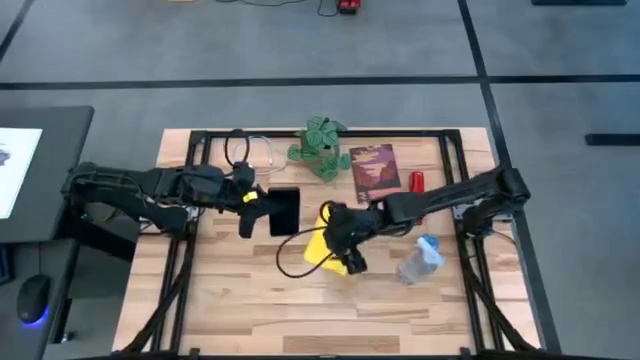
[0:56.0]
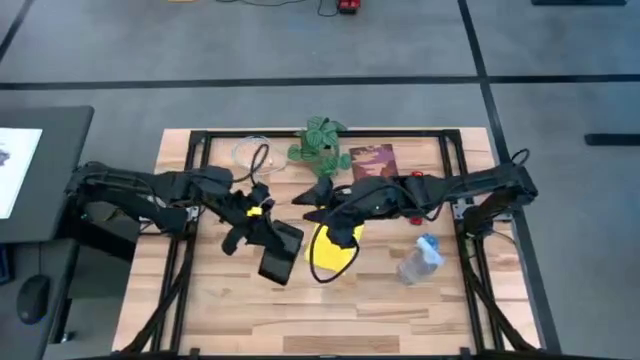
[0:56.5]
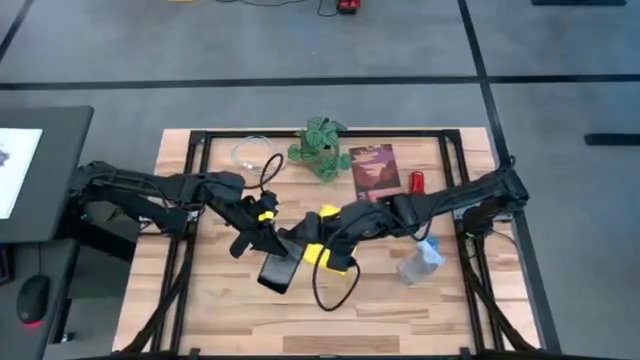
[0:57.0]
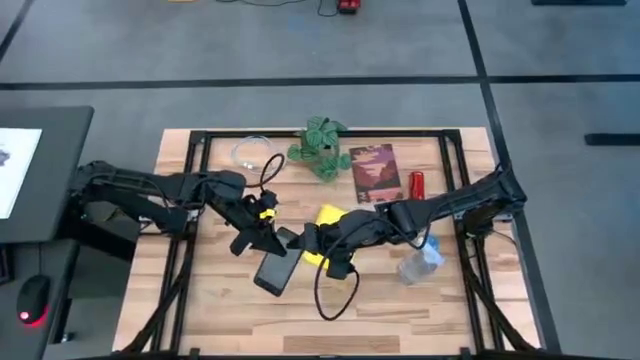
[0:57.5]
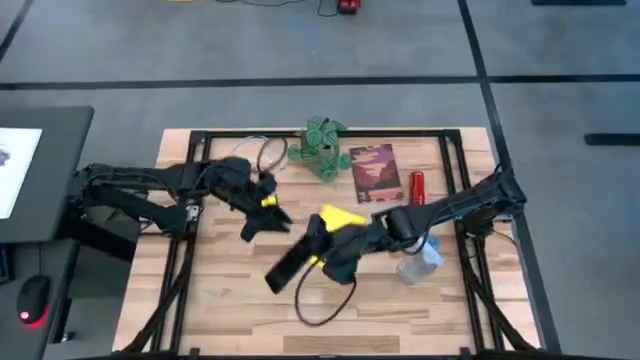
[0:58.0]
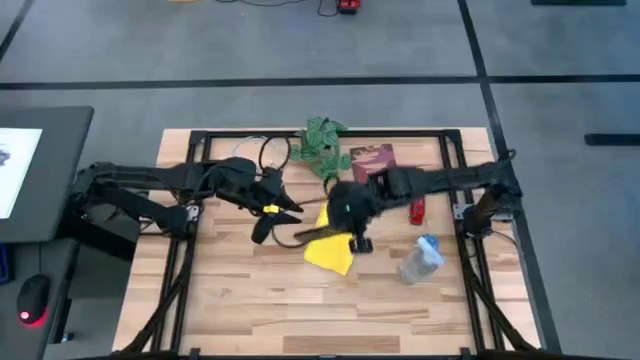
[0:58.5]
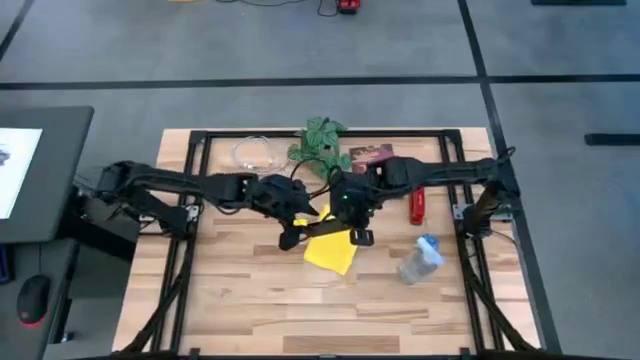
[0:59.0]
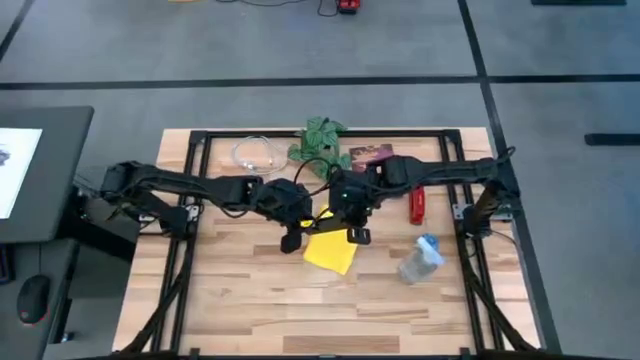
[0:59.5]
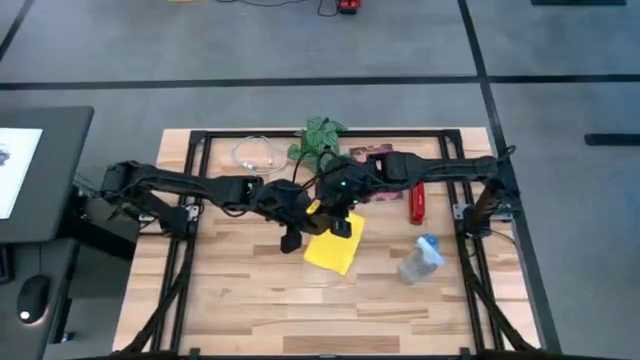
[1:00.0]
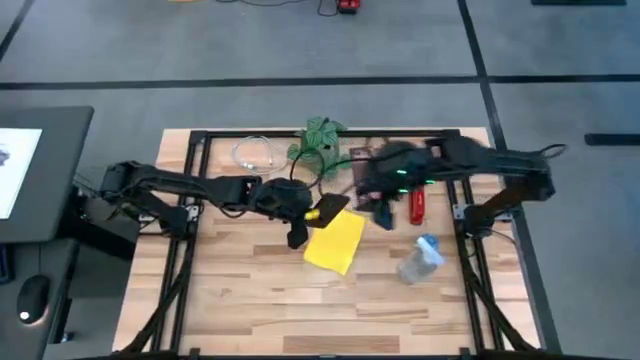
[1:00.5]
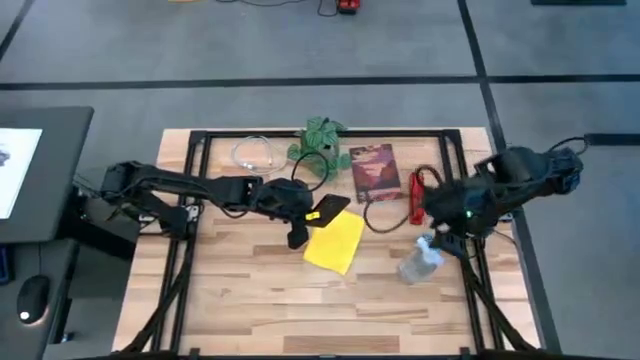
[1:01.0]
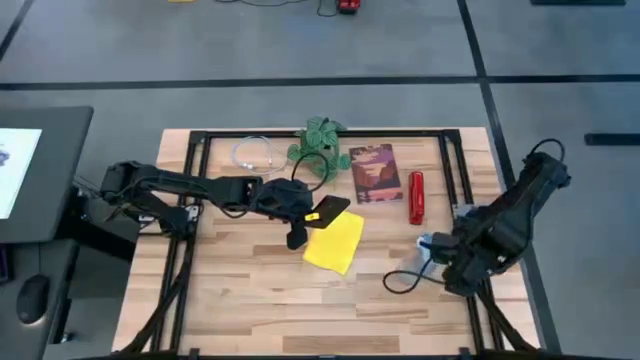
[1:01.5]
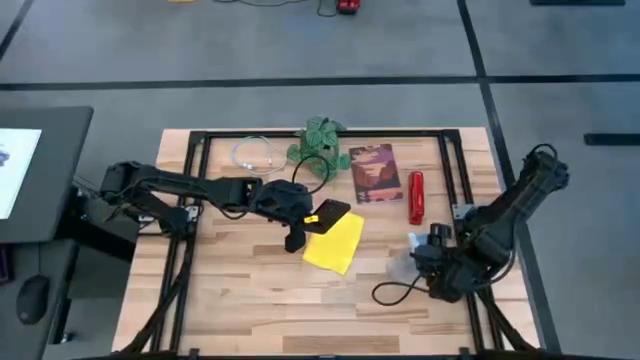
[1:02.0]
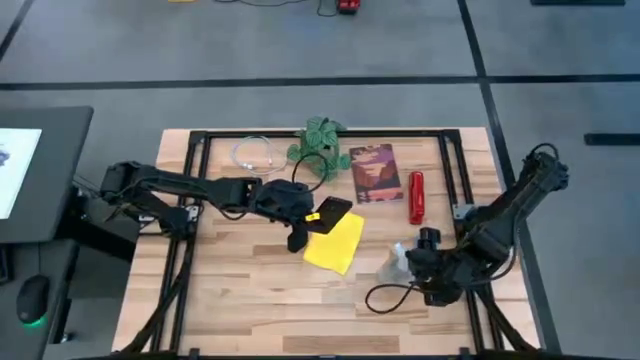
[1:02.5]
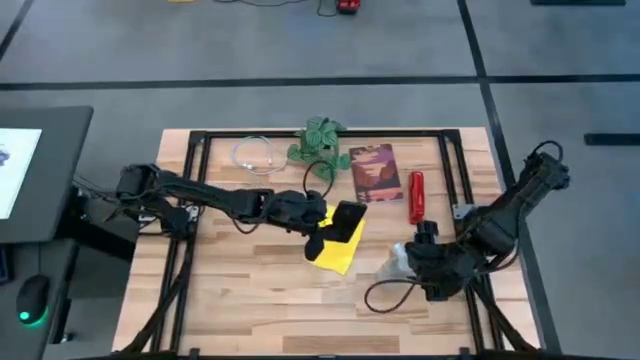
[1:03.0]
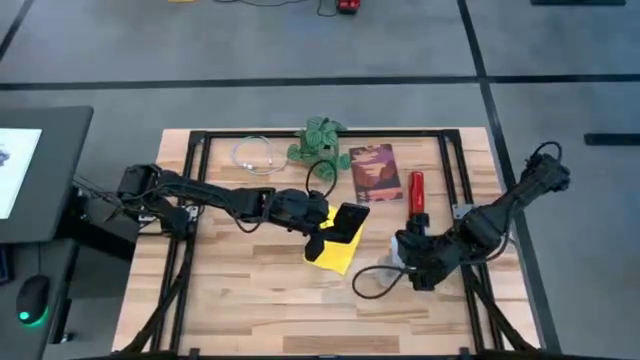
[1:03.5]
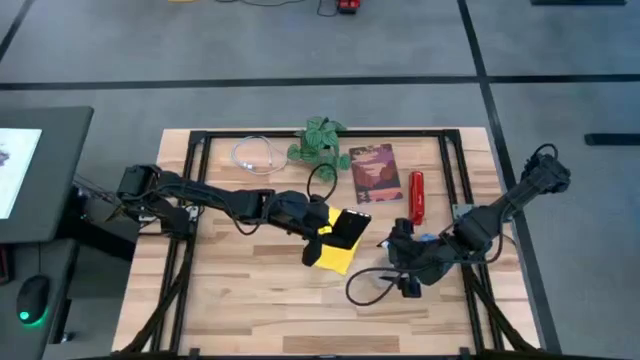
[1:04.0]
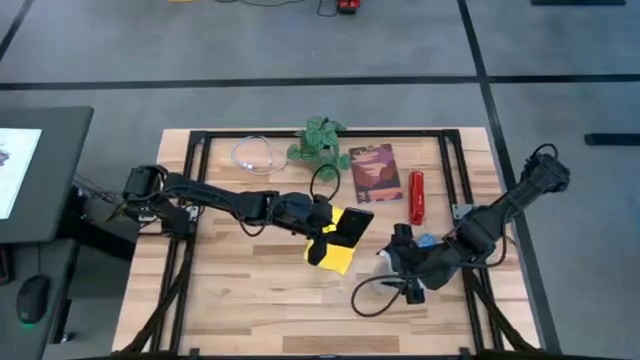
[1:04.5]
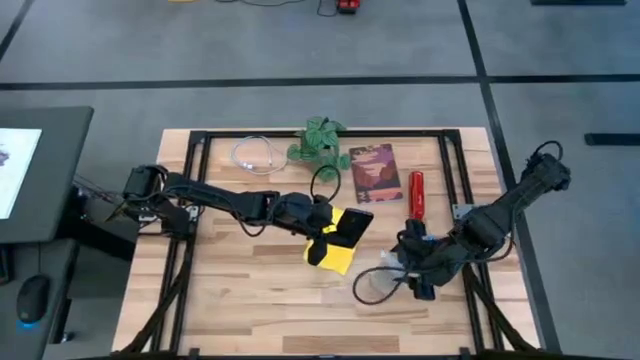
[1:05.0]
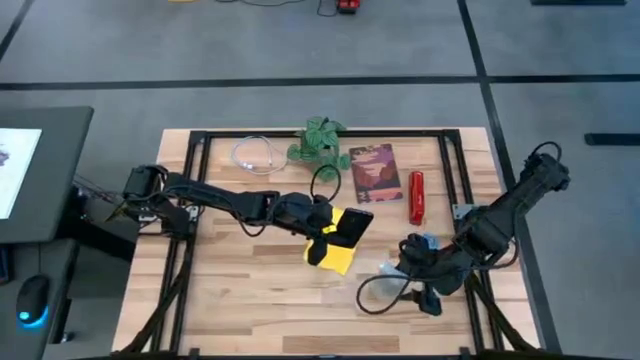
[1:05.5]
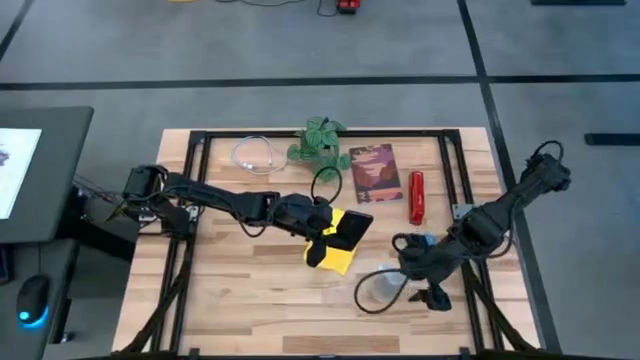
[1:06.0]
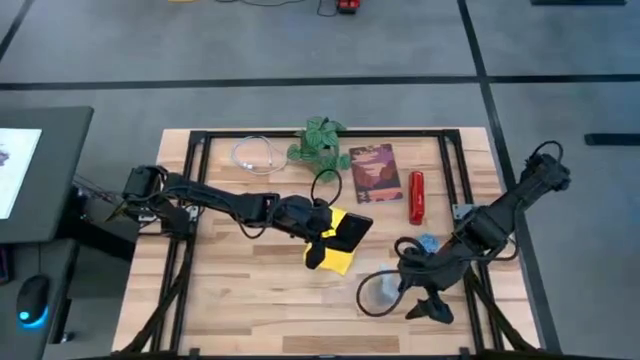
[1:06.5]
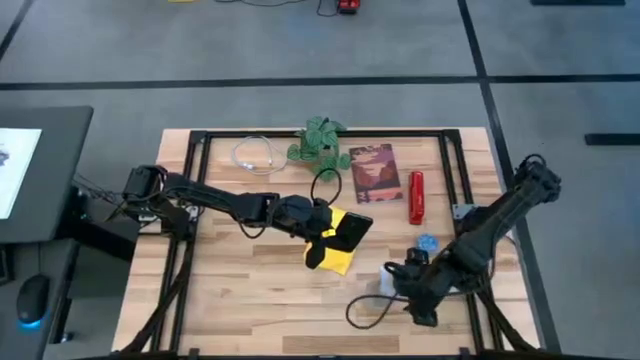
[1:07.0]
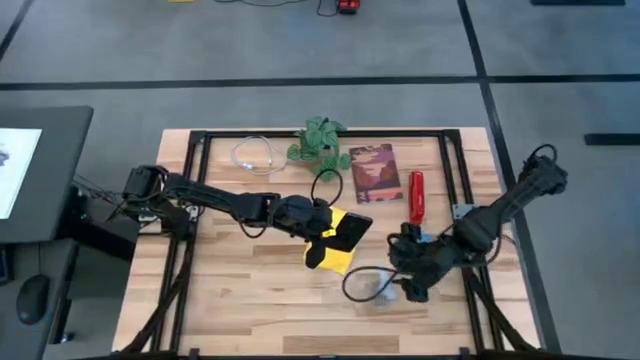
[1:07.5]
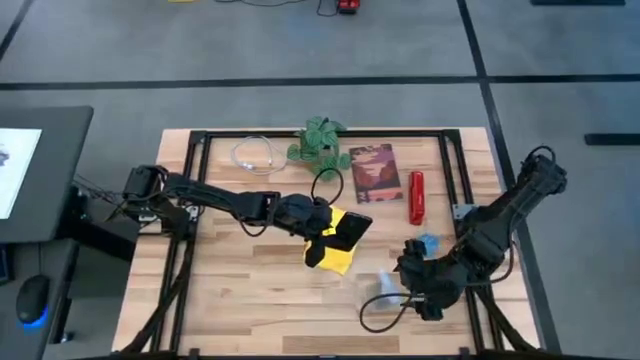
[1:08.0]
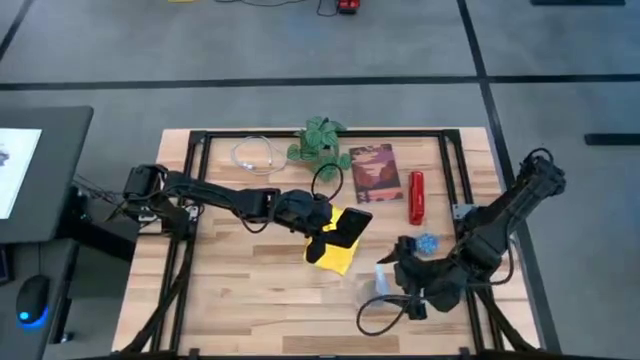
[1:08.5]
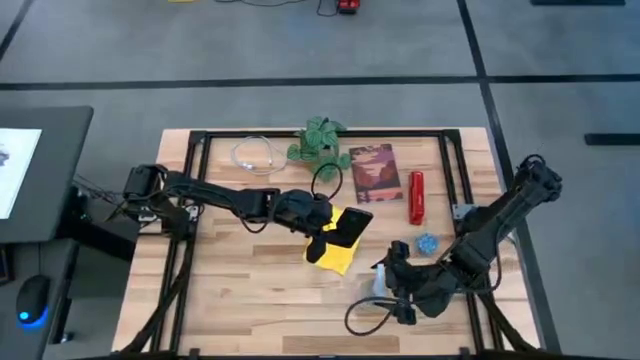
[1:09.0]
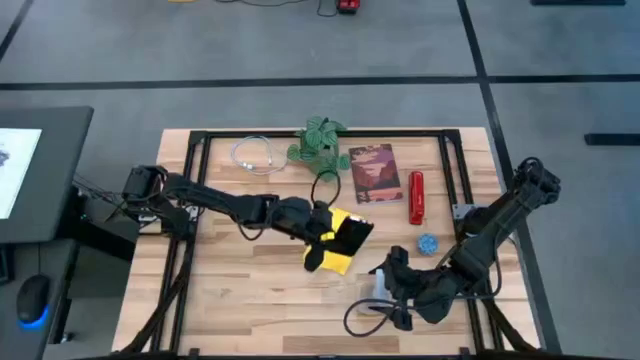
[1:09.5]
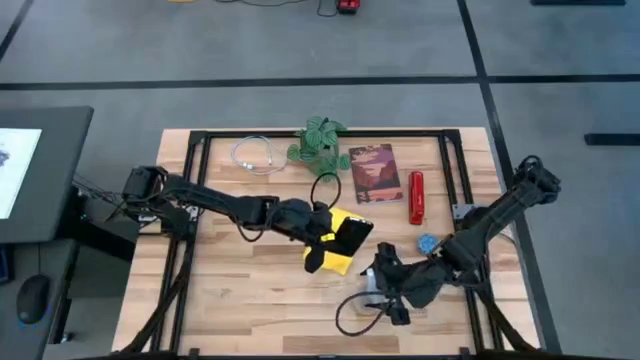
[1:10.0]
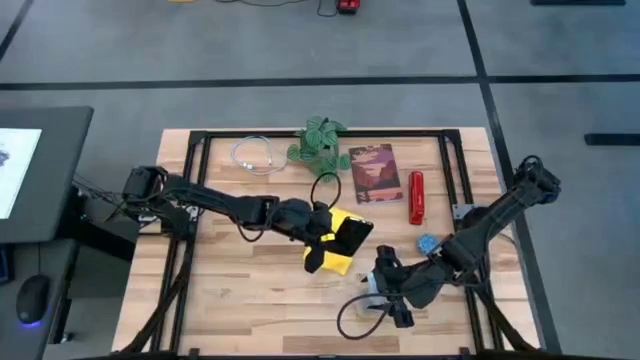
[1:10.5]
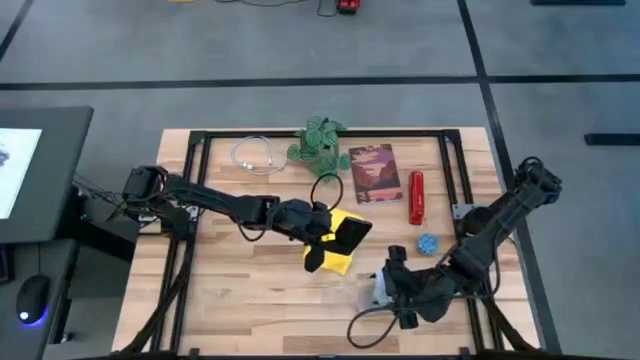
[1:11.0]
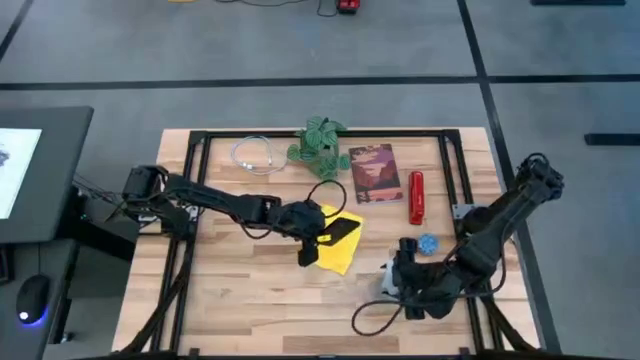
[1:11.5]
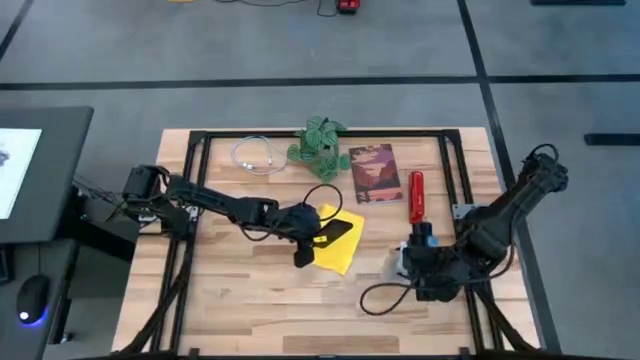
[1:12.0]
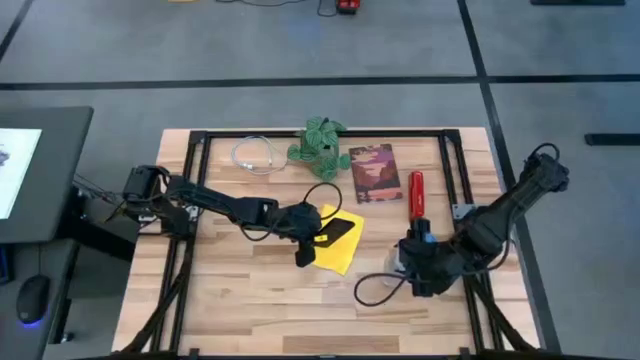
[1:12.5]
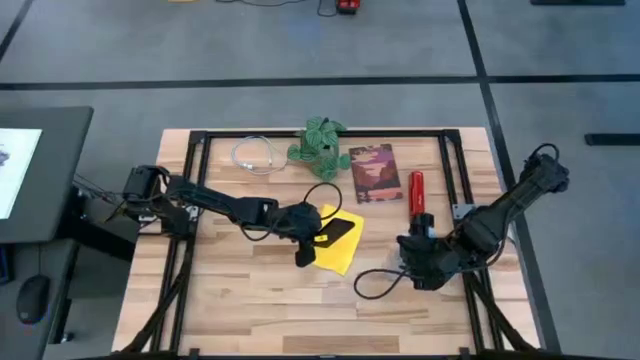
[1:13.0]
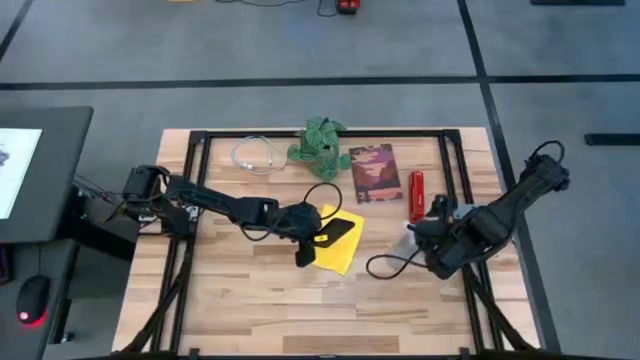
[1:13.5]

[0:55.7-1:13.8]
Task: Apply microfiber cloth
Spray the back of the cellphone with the spray cleaning bottle

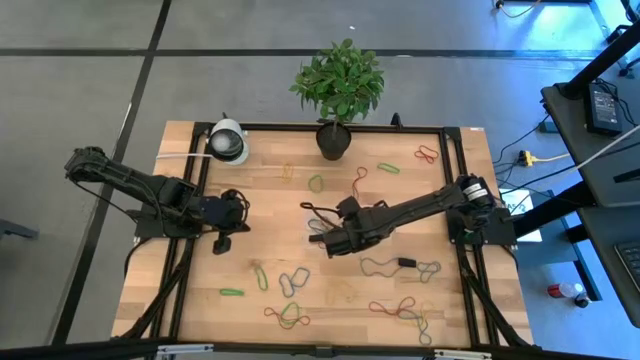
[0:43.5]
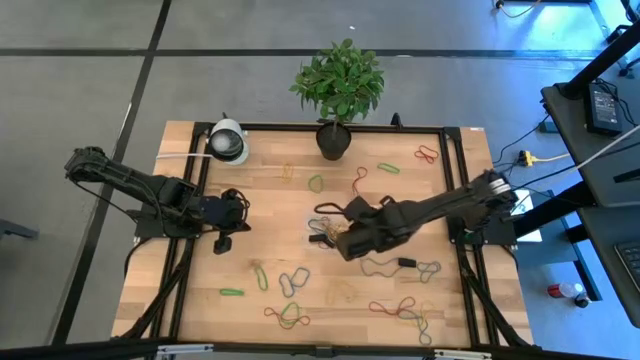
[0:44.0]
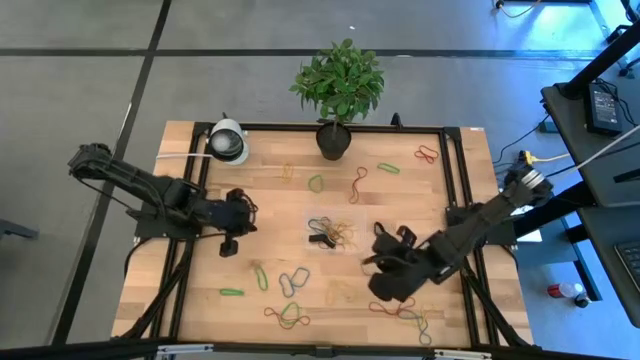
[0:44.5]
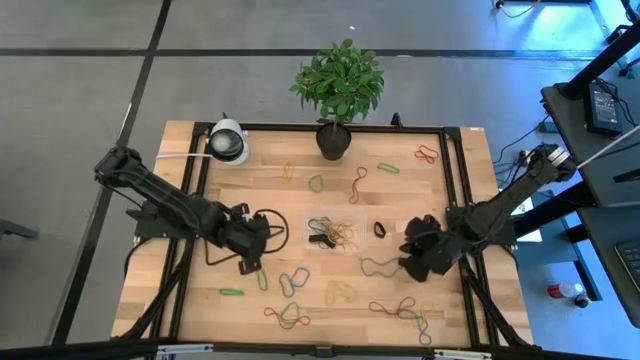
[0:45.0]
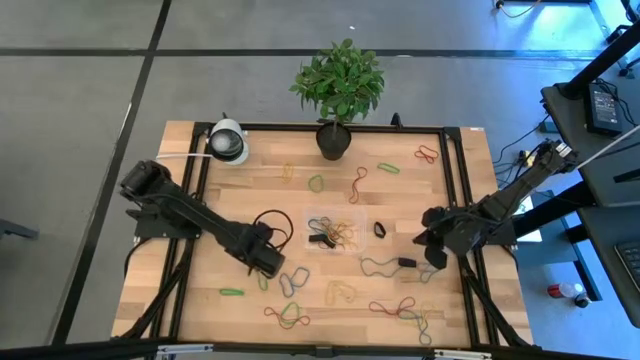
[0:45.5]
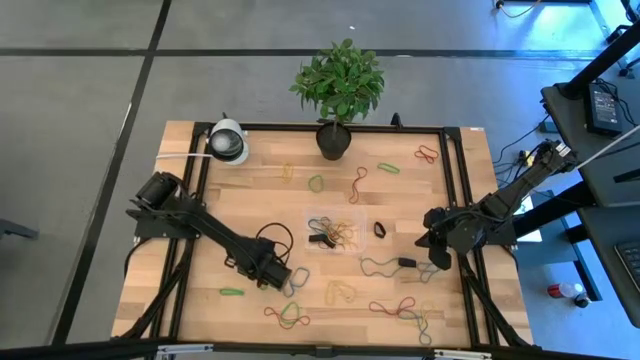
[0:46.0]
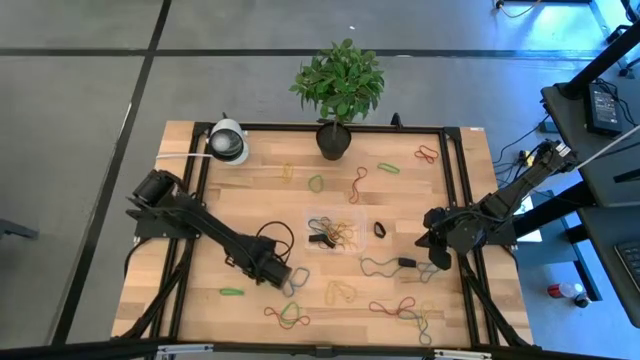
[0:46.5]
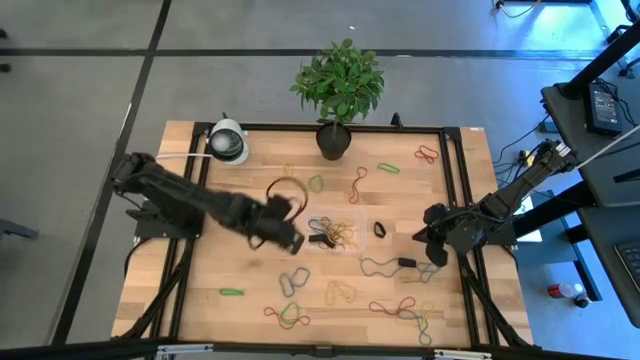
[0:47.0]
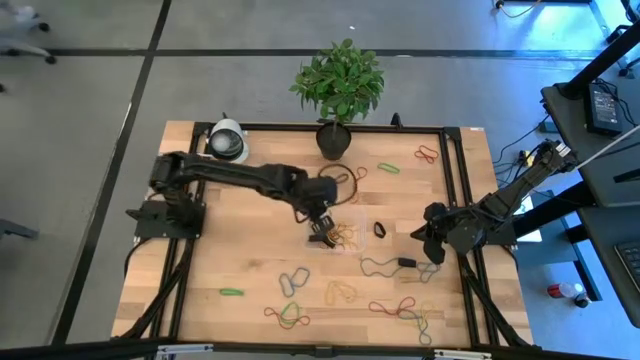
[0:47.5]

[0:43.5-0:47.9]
Task: Pick and place rubber bands into bin
Put the green rubber band into the bin
